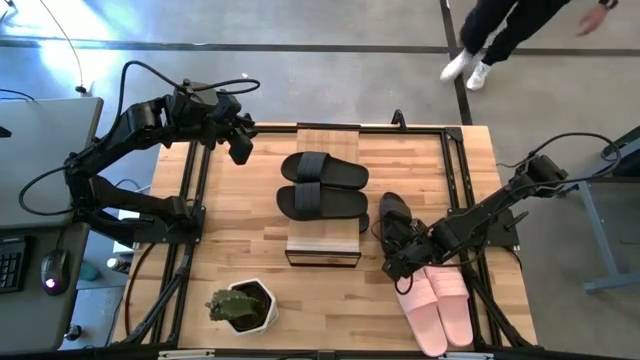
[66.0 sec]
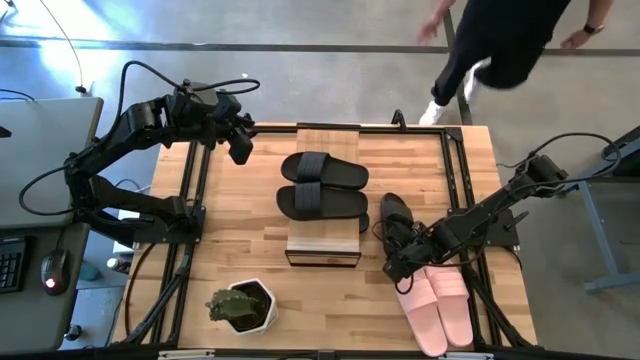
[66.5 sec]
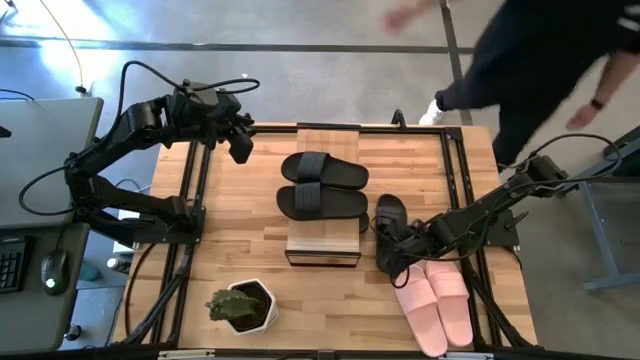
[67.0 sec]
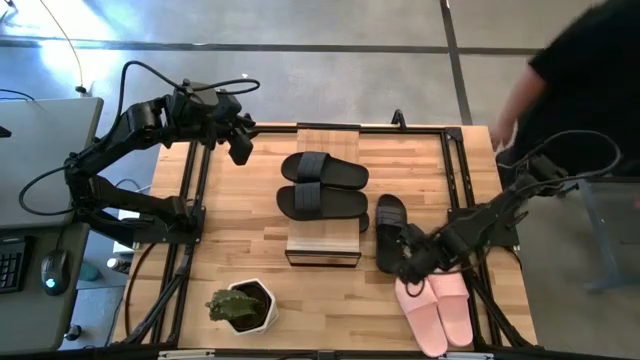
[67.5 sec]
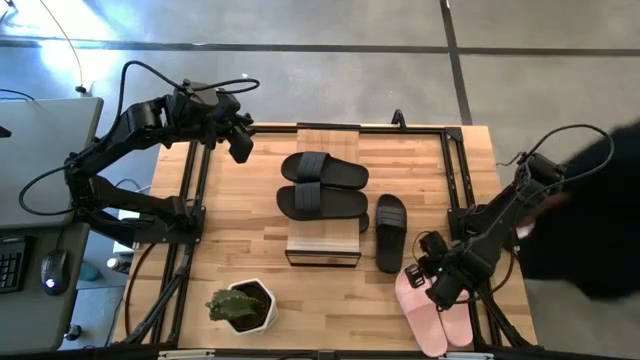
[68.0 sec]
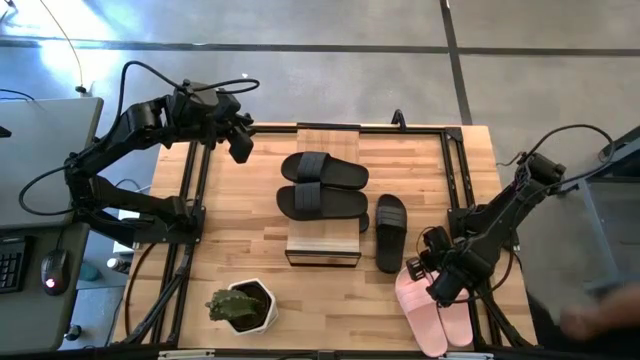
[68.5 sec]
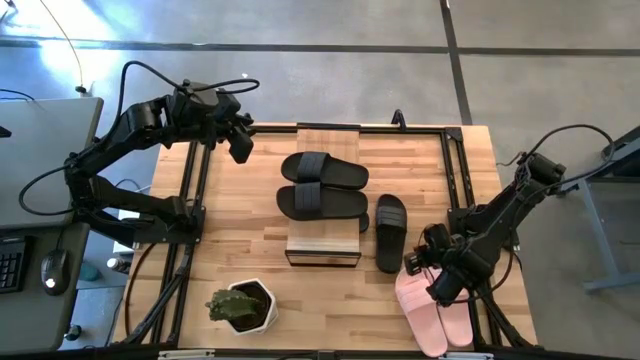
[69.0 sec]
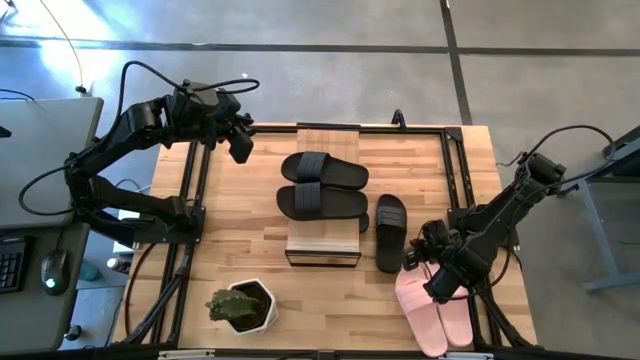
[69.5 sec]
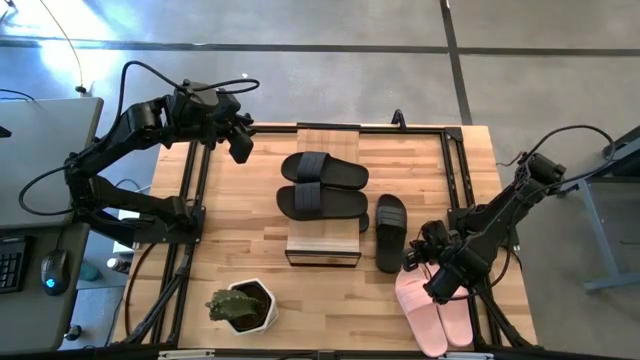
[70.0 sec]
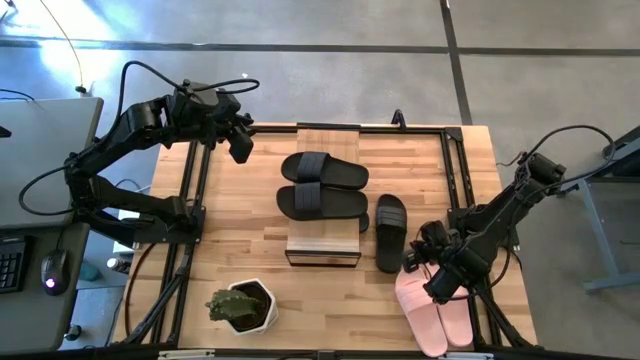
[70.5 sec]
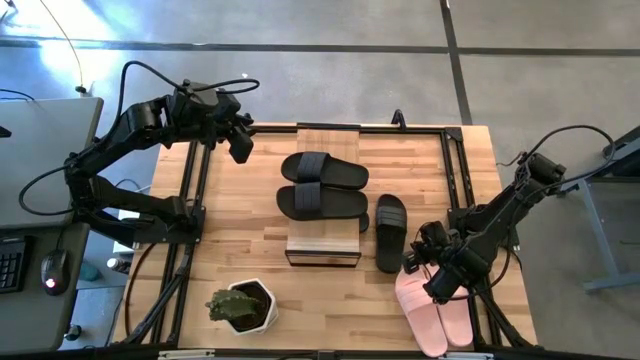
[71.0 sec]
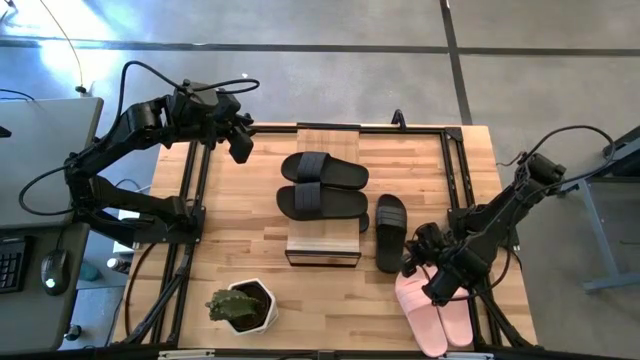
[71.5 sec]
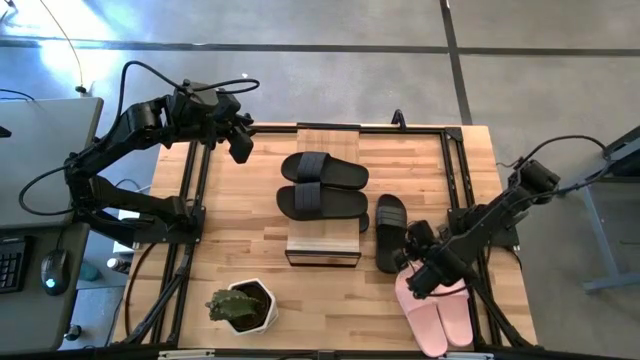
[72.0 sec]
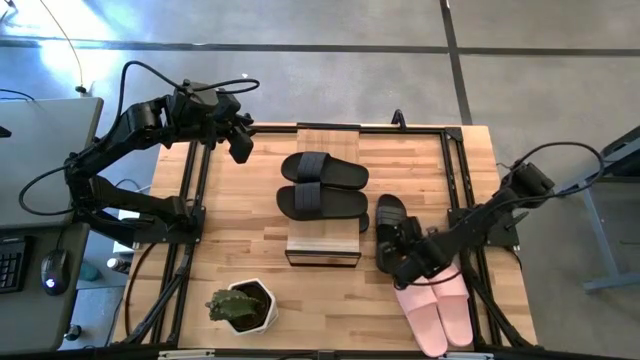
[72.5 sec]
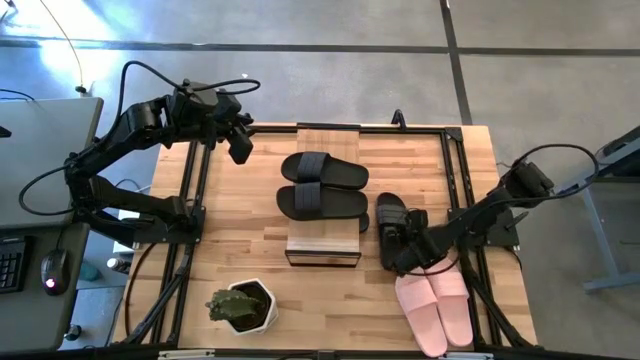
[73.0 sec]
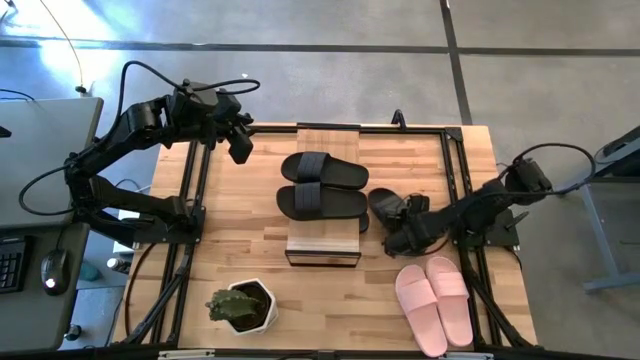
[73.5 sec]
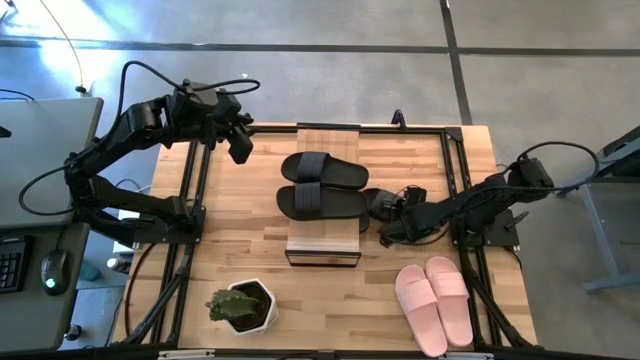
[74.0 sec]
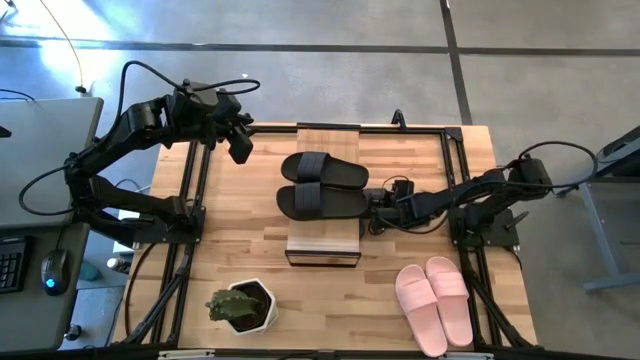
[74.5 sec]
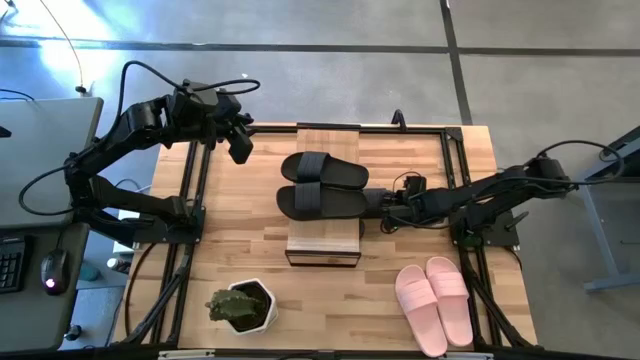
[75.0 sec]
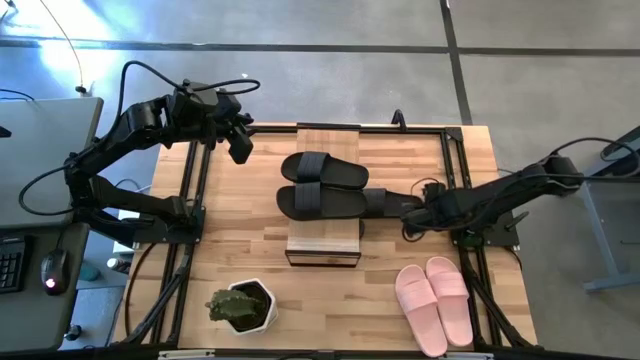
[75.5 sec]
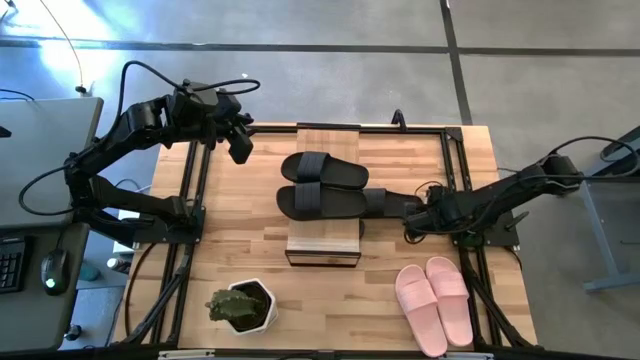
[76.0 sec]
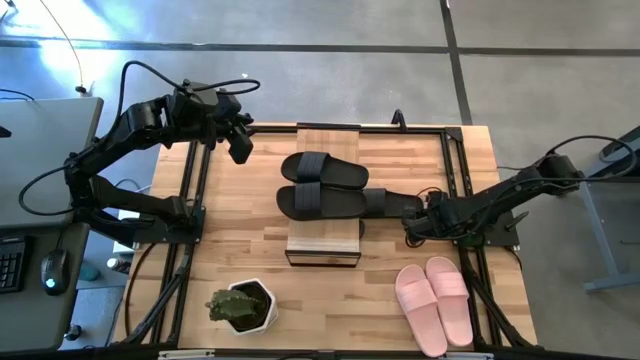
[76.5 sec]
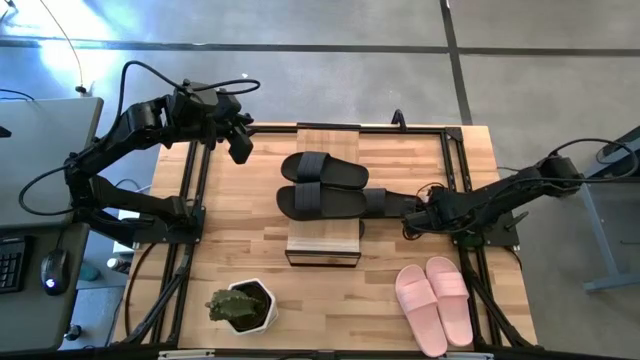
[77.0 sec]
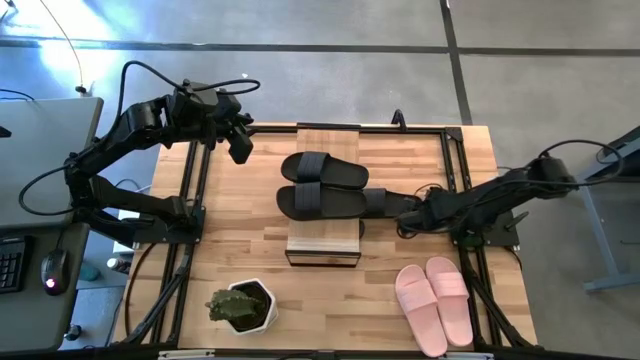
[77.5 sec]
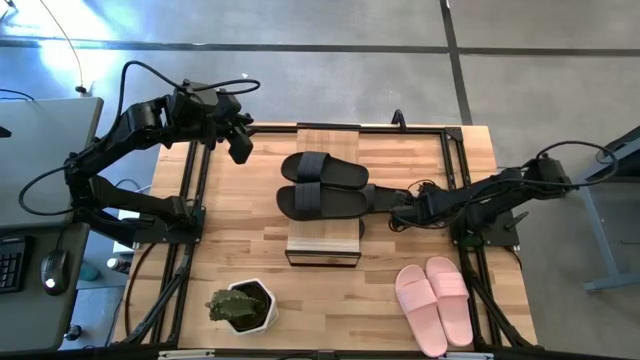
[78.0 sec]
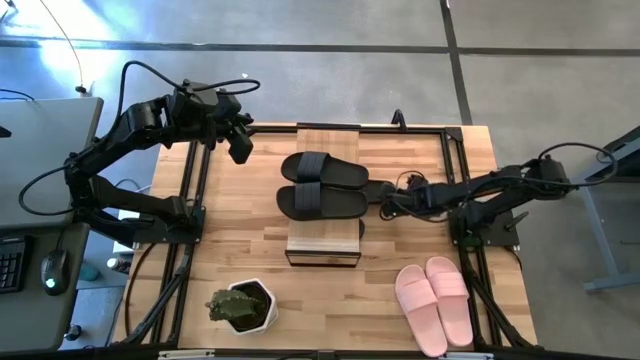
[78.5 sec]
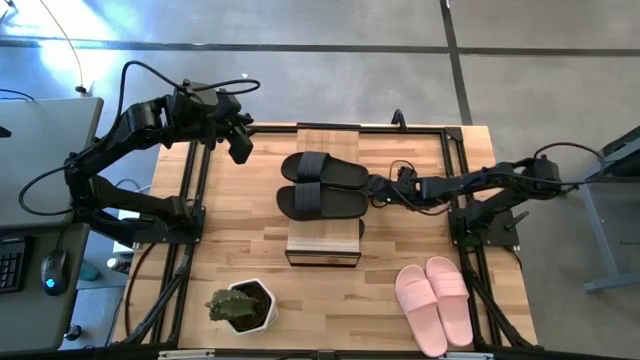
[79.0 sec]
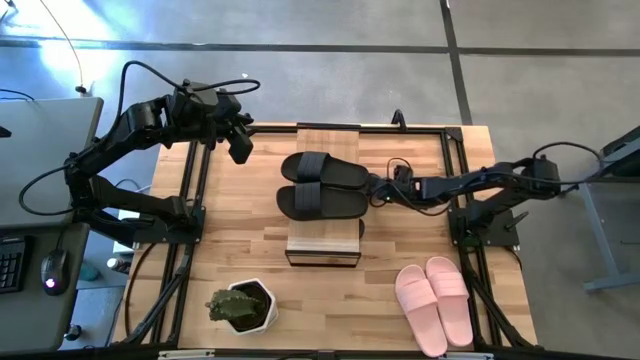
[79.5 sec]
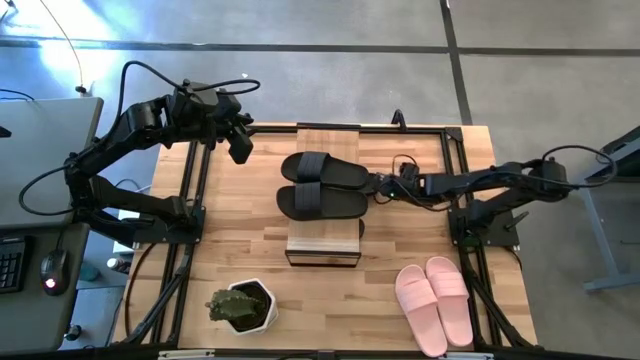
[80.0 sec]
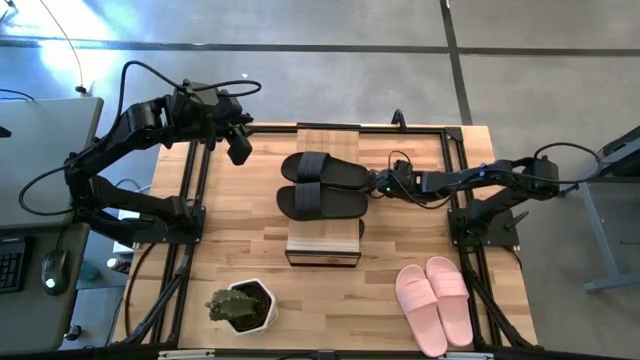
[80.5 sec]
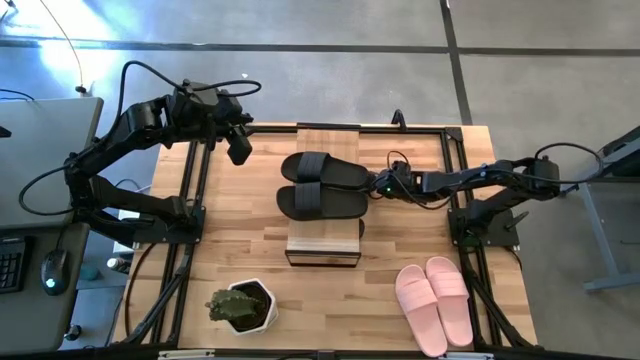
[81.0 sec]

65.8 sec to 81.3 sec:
Task: Pick and place slides into the shelf
Put the black slipper under the shelf

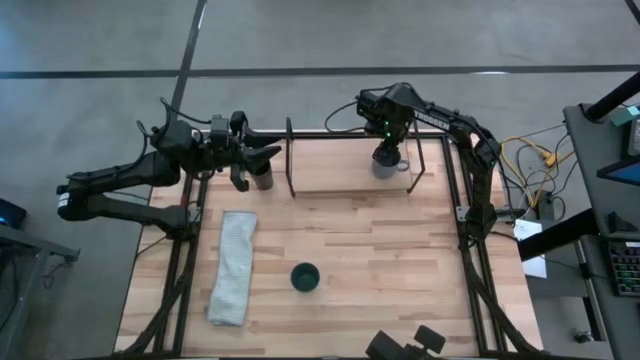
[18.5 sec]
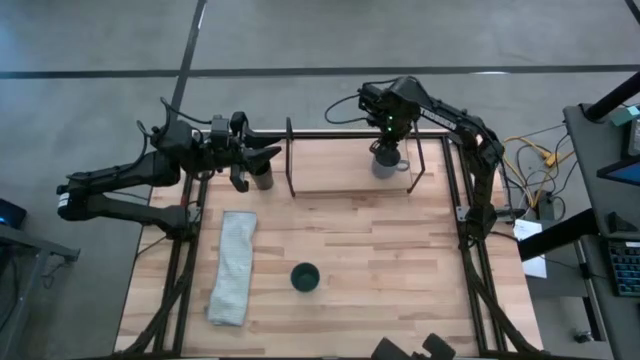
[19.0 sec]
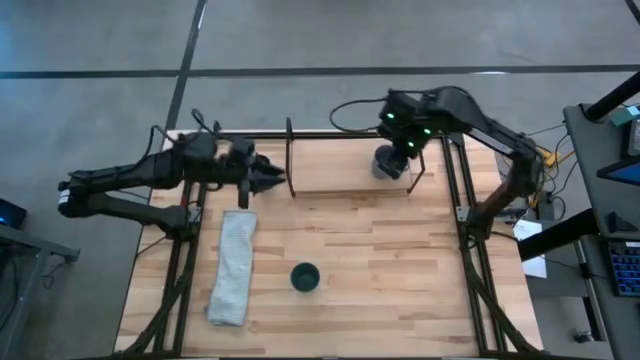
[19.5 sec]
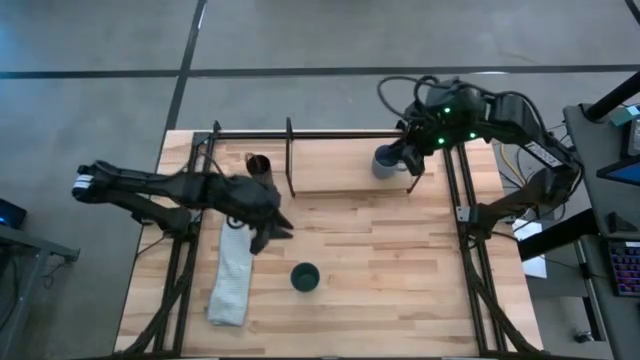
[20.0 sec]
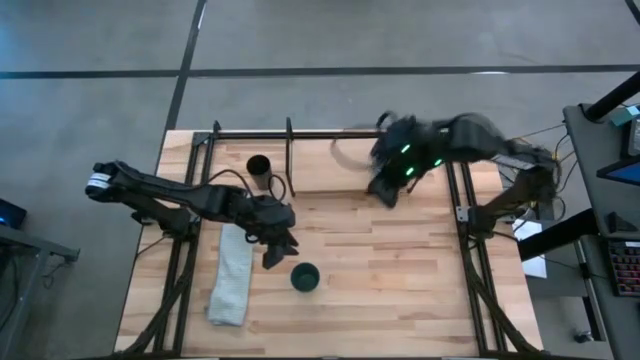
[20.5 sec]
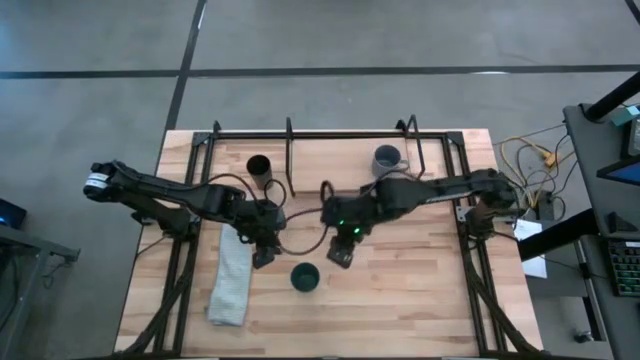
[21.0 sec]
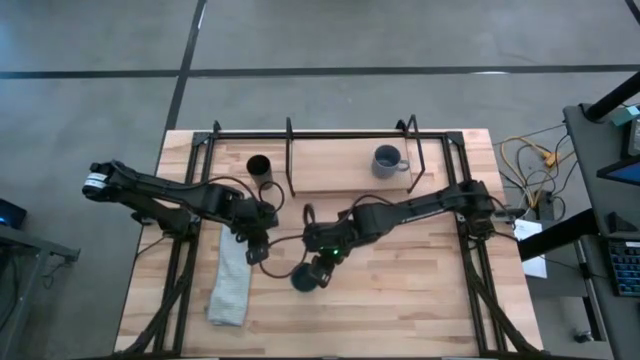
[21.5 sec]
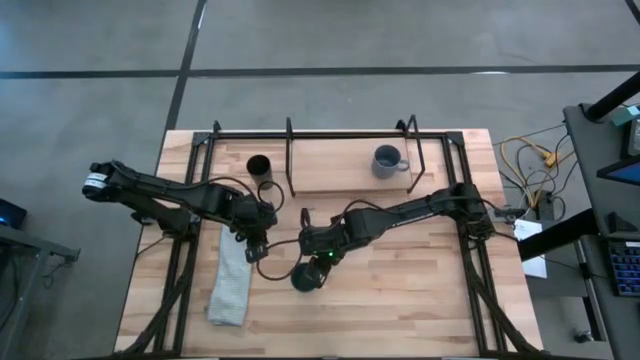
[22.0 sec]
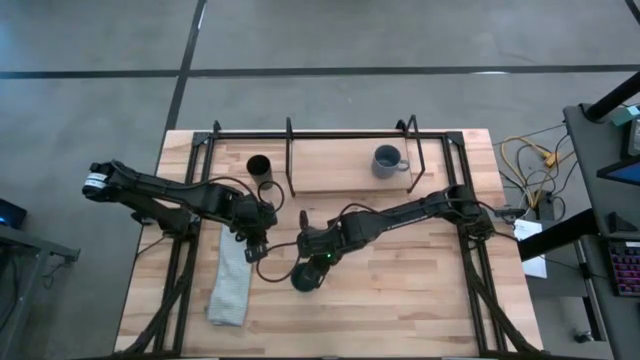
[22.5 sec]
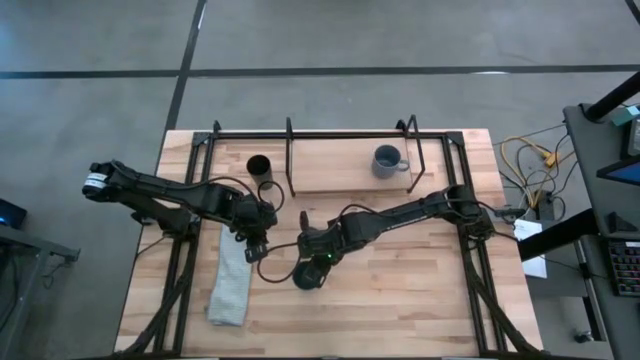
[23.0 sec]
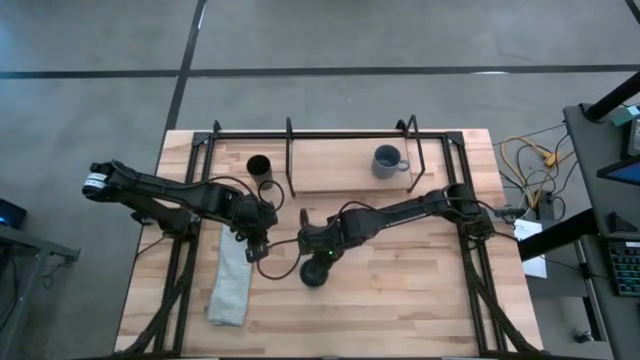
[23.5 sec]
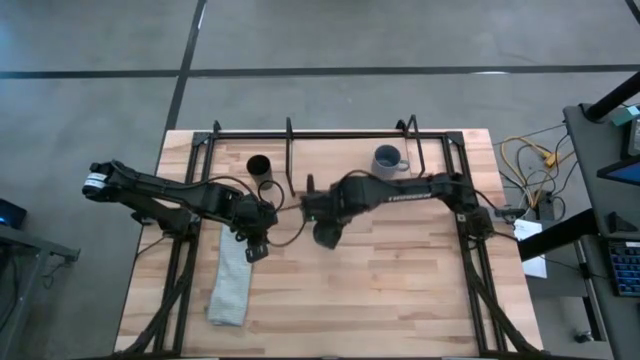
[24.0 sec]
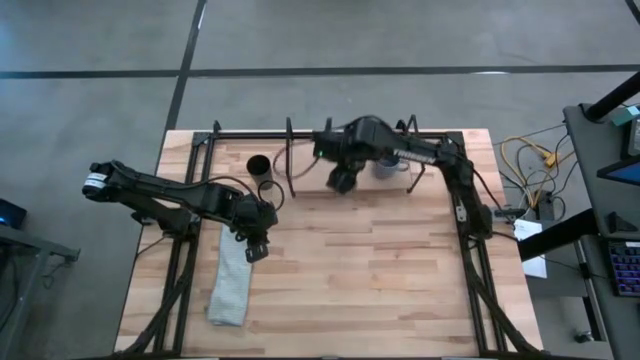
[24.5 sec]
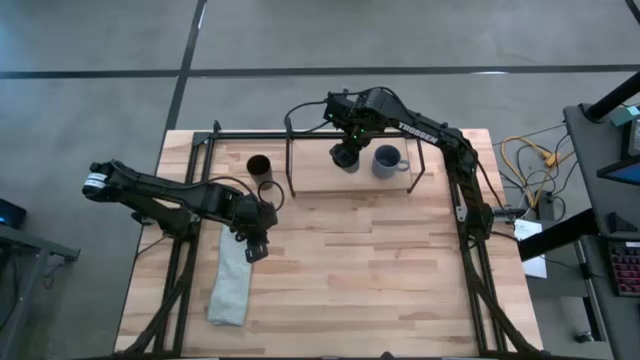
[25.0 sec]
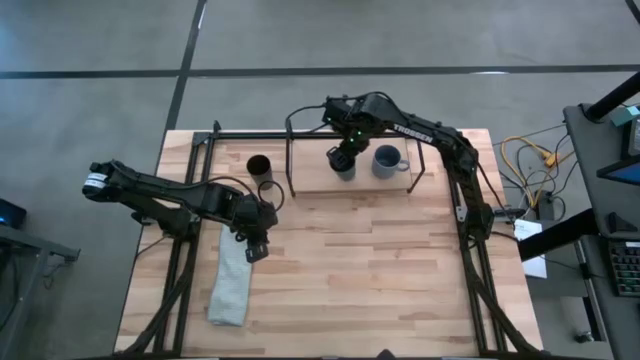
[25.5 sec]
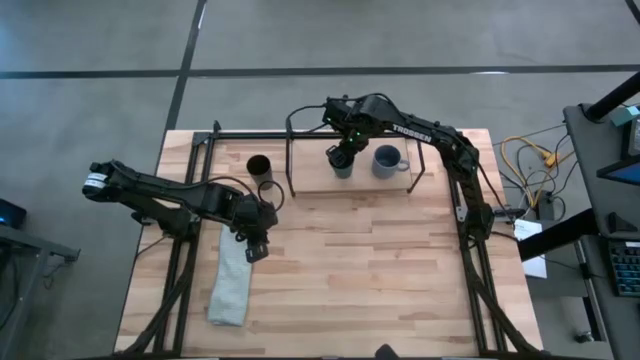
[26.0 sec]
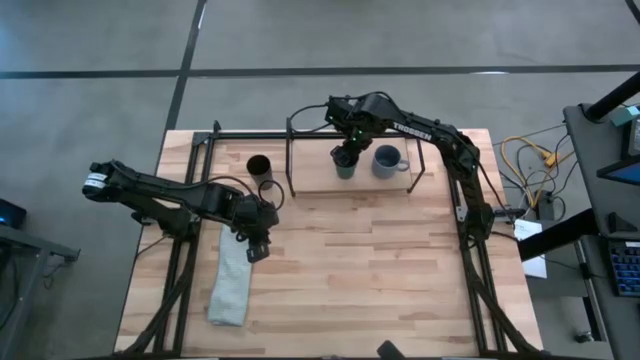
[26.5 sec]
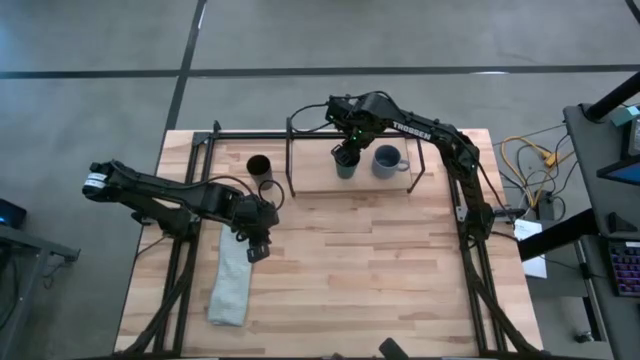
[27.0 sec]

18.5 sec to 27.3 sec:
Task: Stack small to large cups/mugs on shelf
Put the green cup on the shelf
